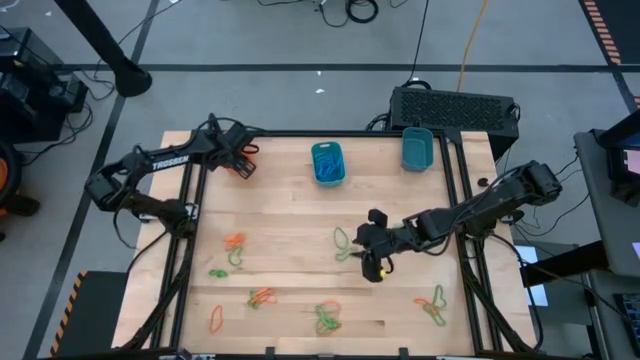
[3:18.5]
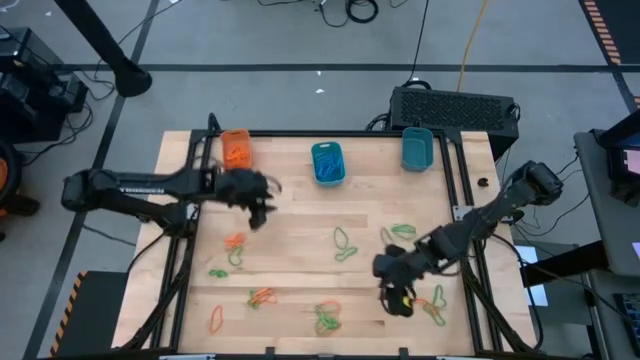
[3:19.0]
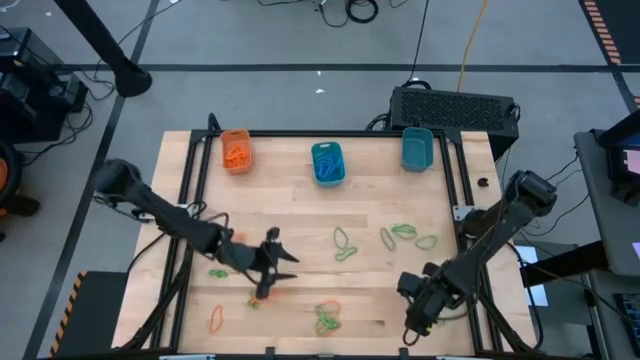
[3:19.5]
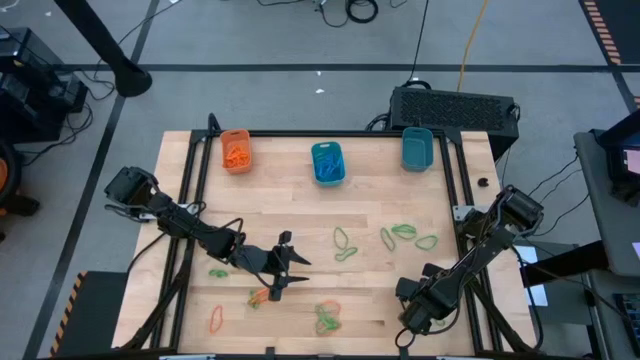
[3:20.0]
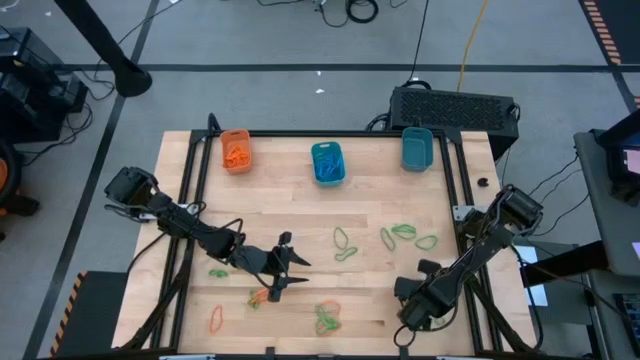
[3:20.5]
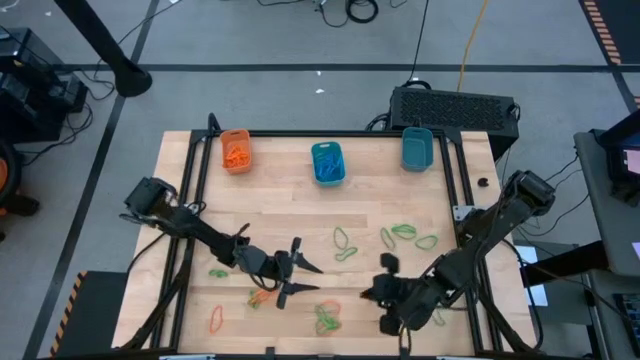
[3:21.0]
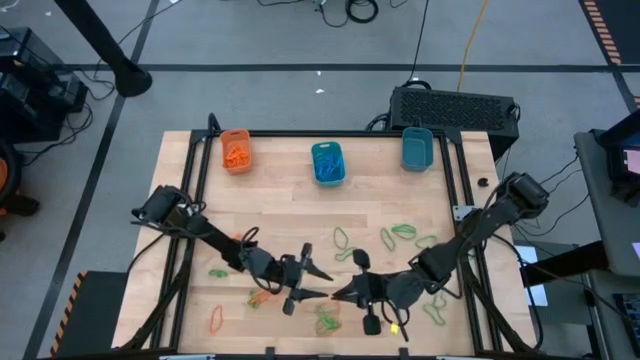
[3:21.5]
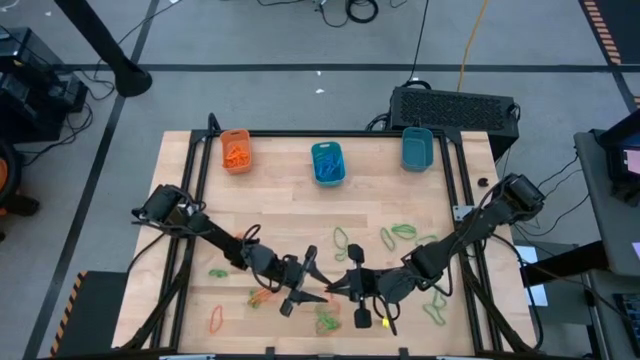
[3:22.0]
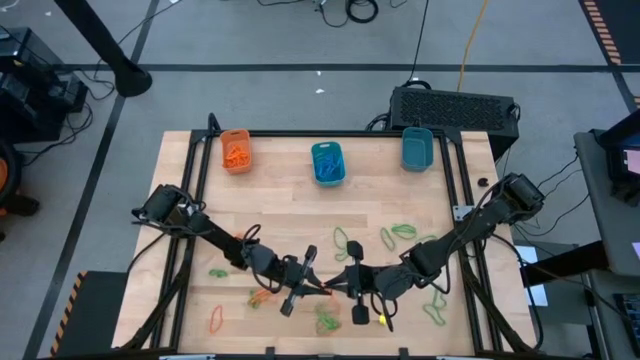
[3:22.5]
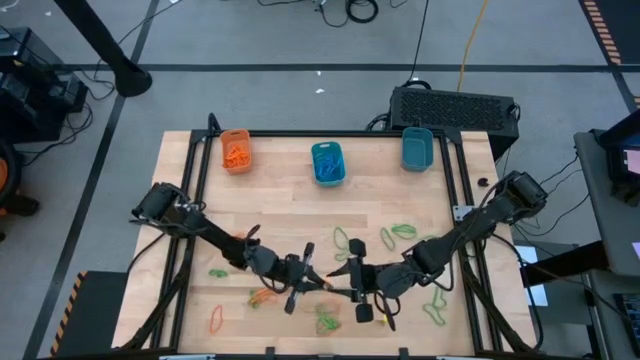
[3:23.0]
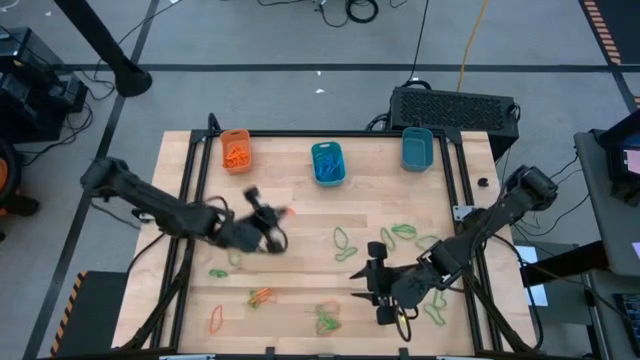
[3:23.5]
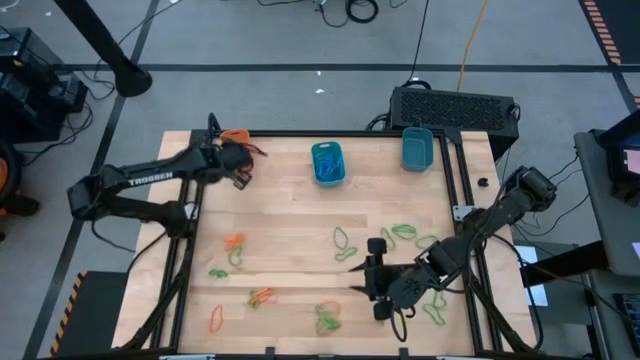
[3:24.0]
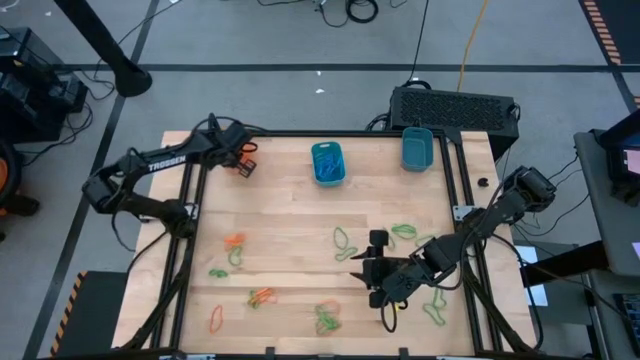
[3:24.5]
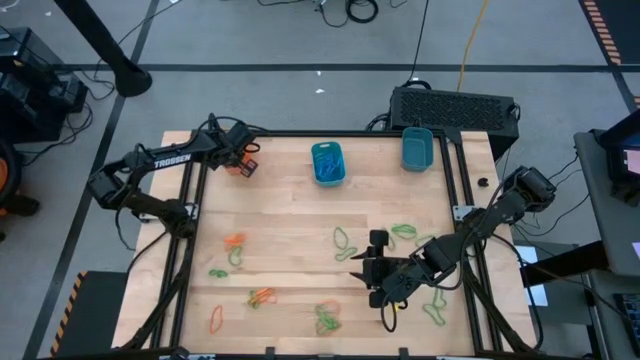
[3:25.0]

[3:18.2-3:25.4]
Task: Sort rubber bands into baskets
Put the orange rubber band into the orange bin

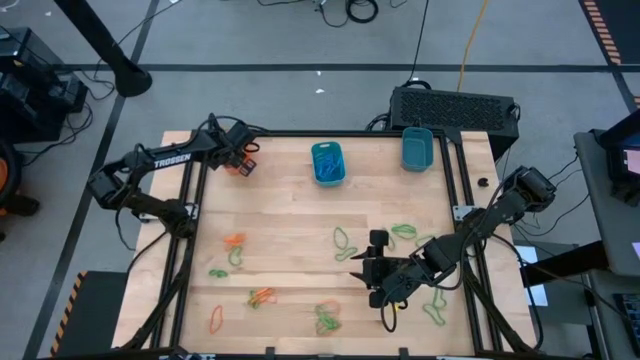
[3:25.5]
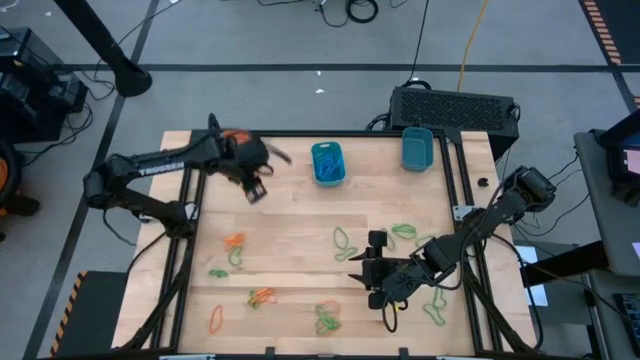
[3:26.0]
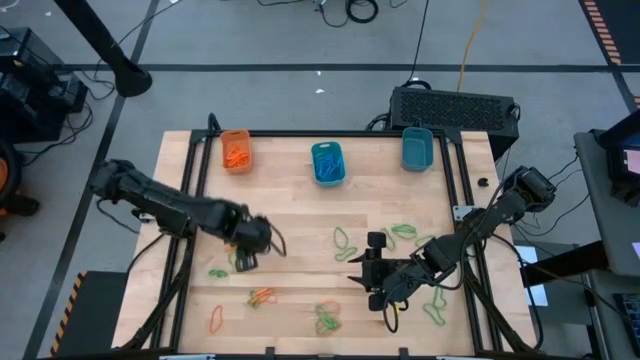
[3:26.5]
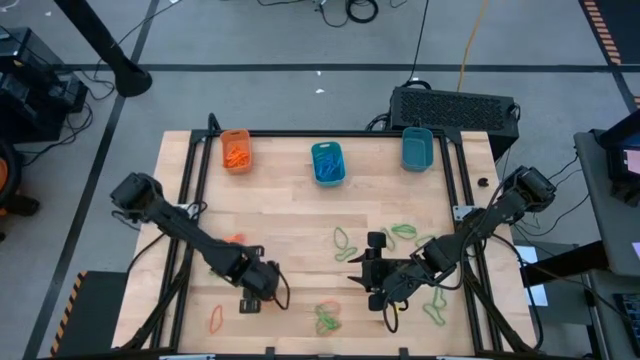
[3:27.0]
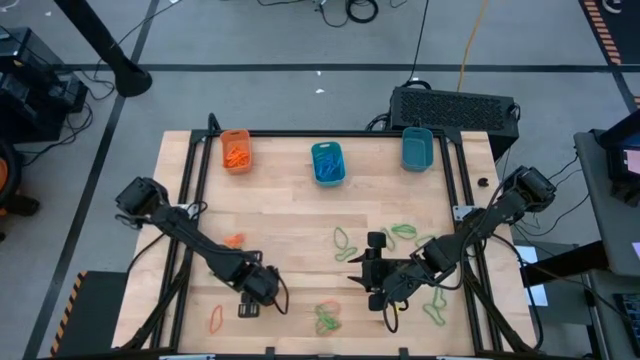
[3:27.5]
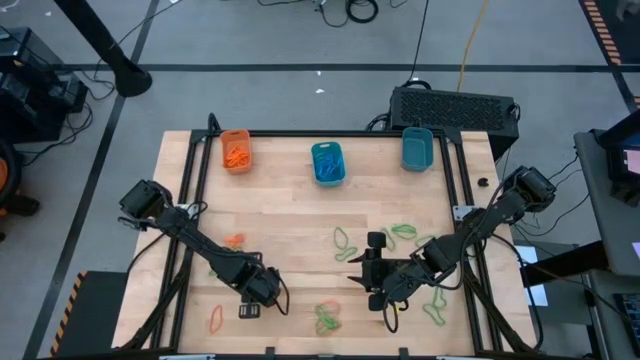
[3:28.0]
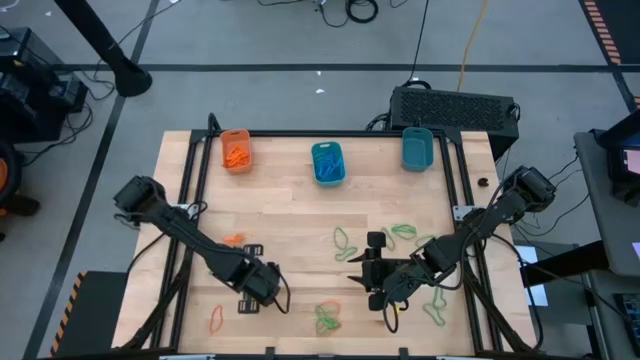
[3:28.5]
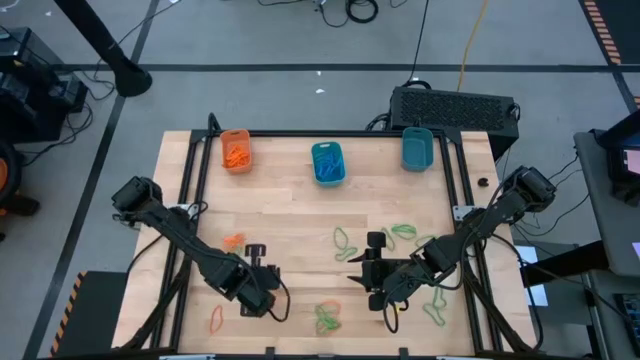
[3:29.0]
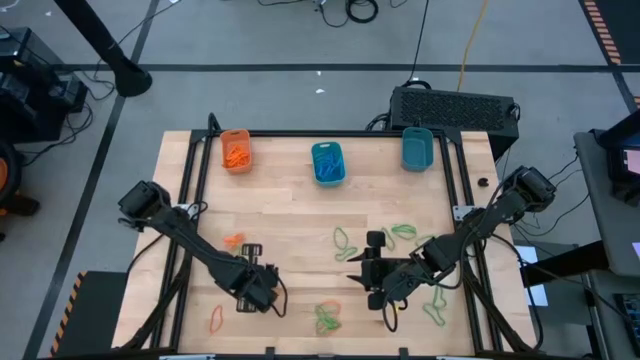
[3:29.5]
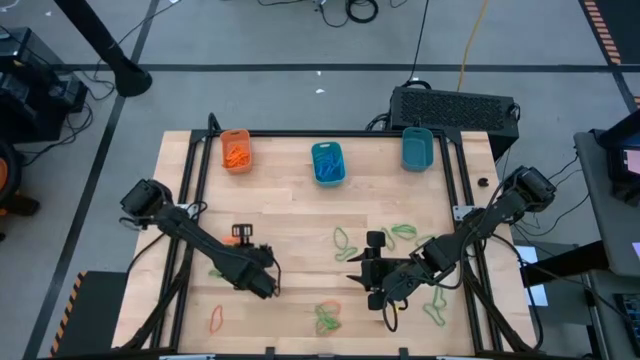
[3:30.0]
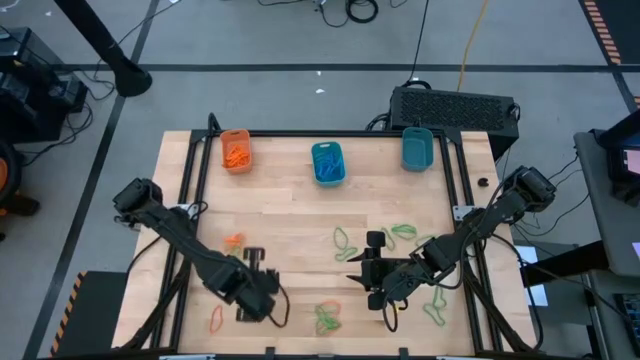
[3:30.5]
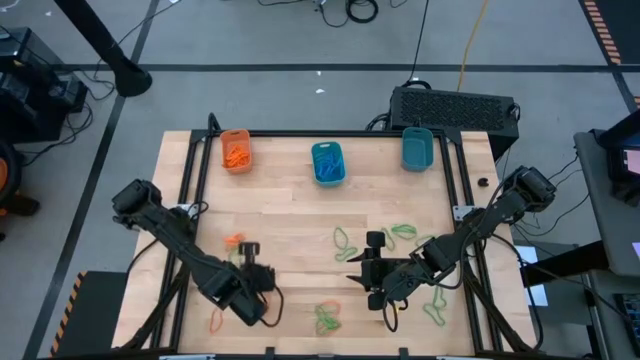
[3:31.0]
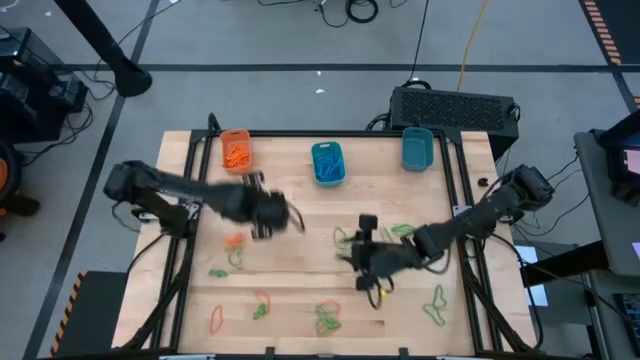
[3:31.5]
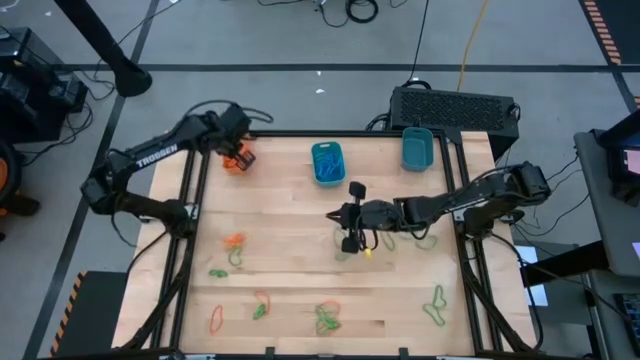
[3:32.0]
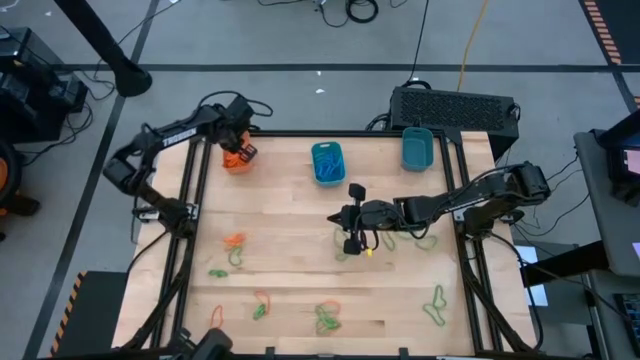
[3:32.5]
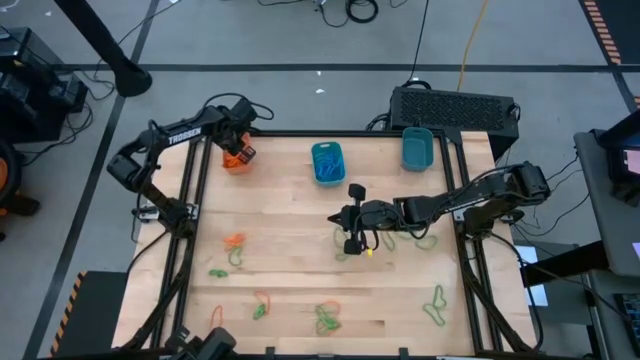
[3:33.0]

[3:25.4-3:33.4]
Put the orange rubber band into the orange bin

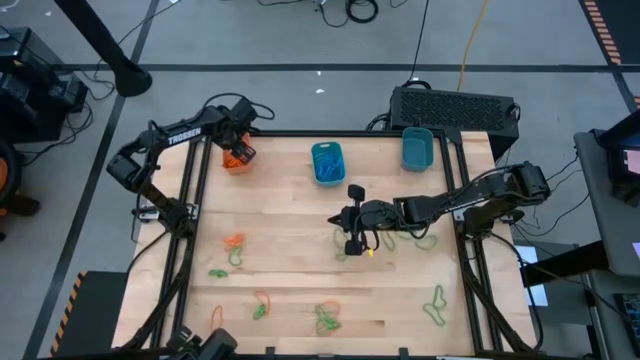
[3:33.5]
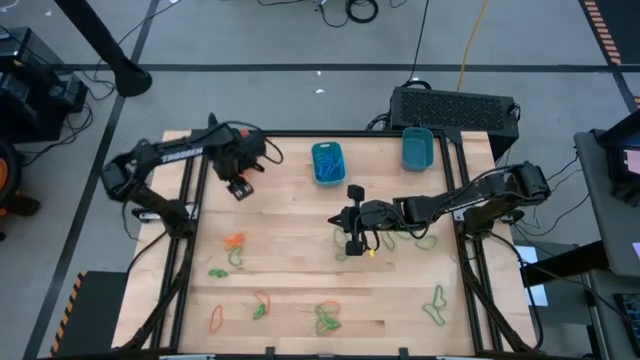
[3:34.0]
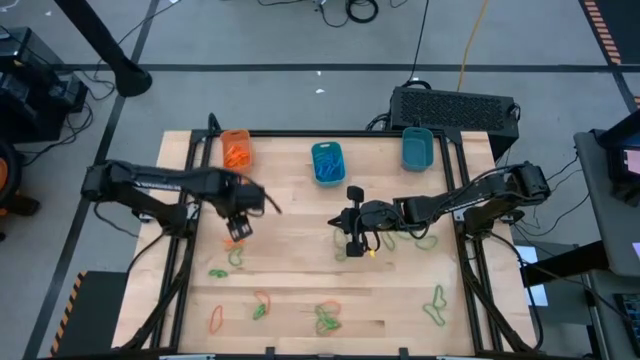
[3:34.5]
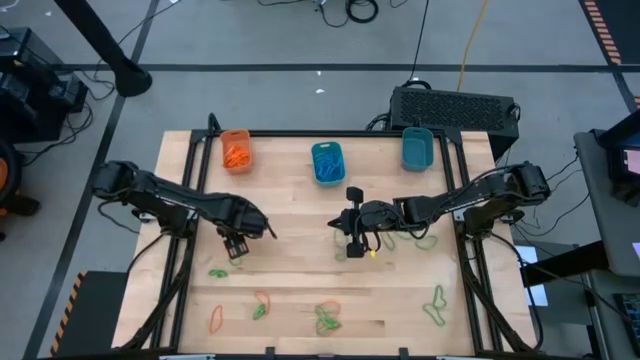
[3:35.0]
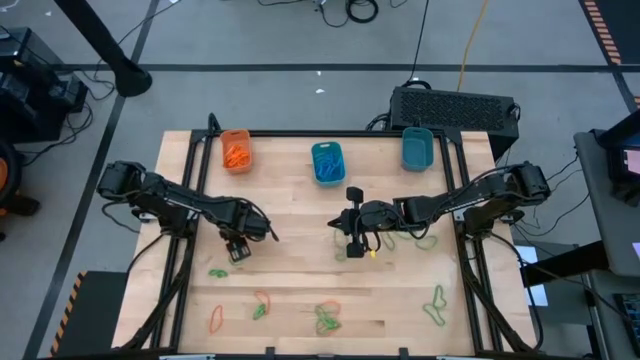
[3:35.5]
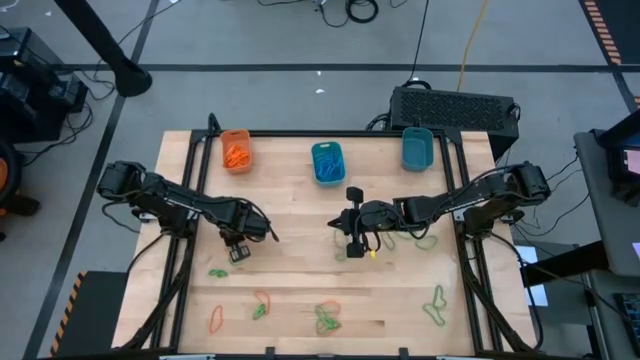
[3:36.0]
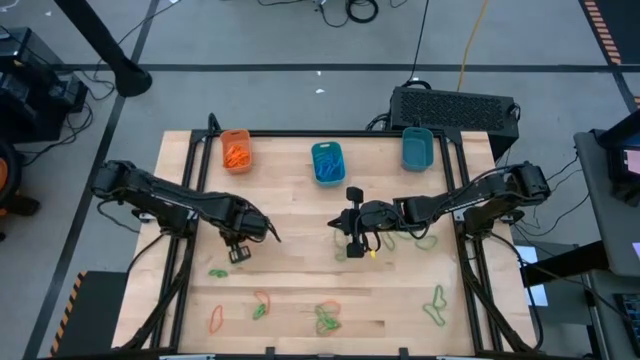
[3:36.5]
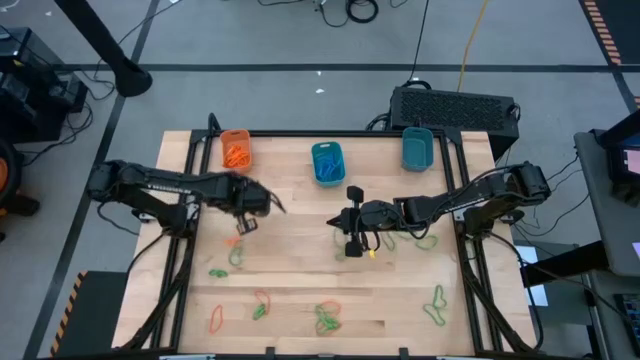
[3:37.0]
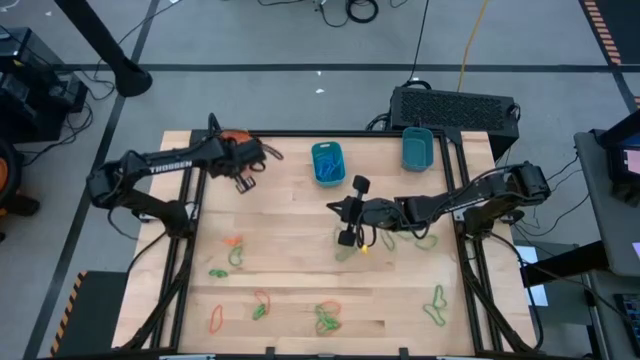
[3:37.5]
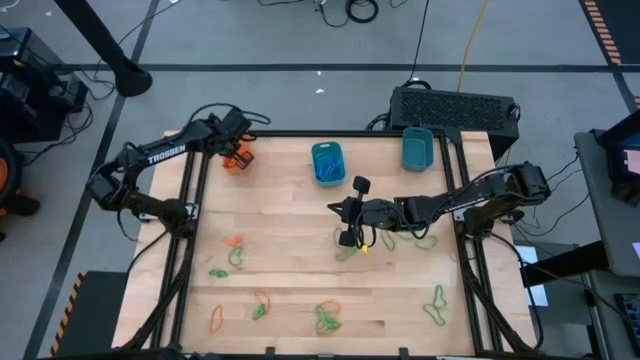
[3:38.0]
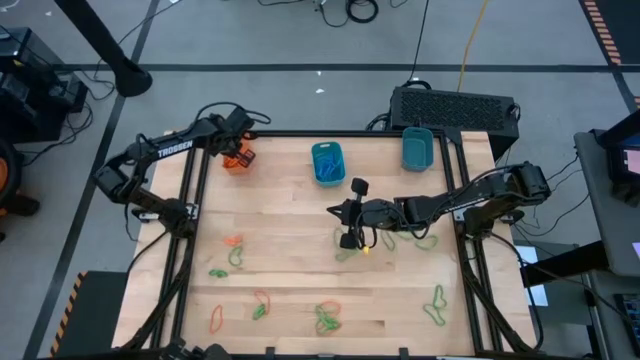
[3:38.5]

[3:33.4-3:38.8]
Put the orange rubber band into the orange bin
